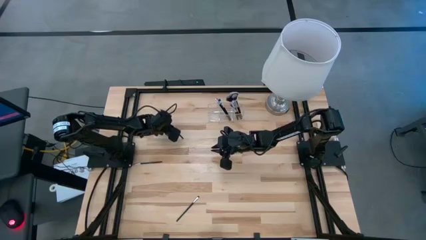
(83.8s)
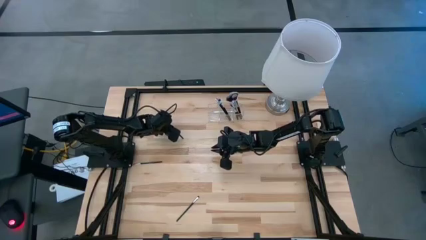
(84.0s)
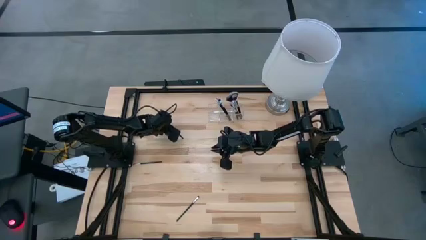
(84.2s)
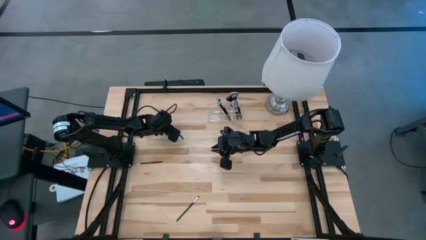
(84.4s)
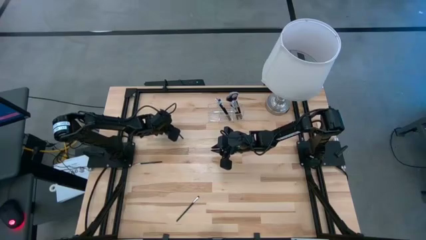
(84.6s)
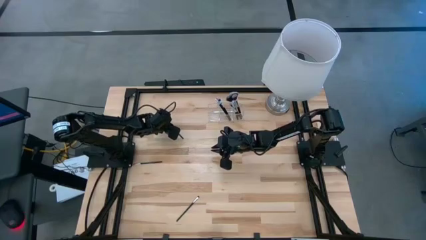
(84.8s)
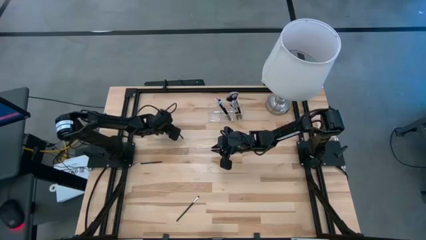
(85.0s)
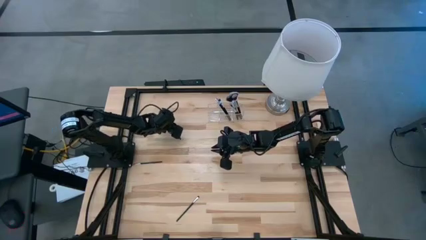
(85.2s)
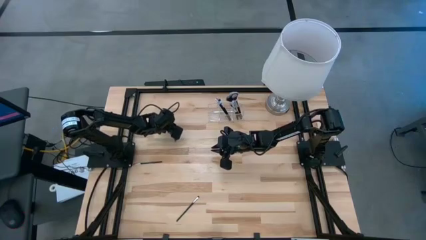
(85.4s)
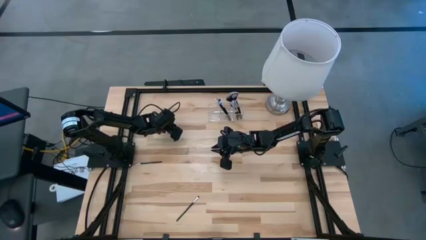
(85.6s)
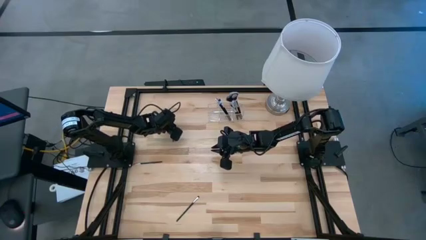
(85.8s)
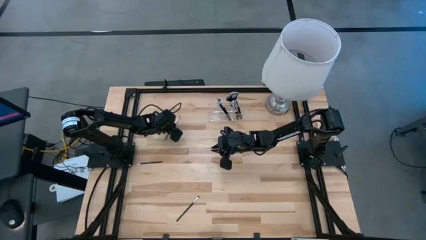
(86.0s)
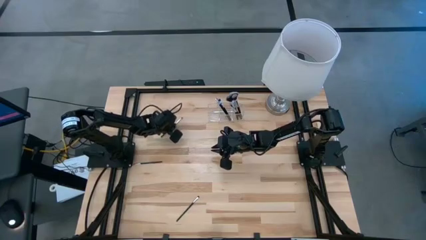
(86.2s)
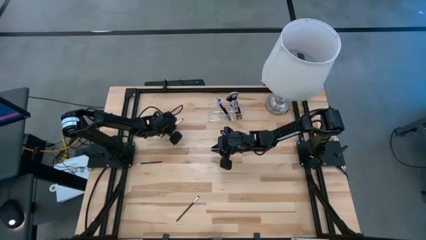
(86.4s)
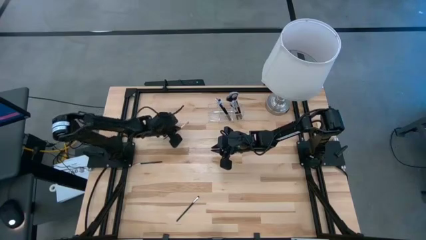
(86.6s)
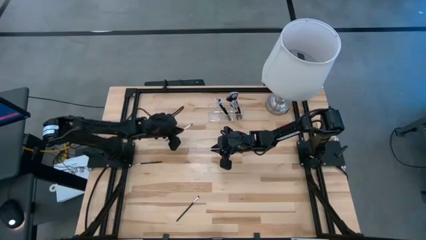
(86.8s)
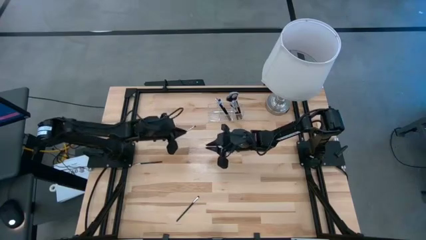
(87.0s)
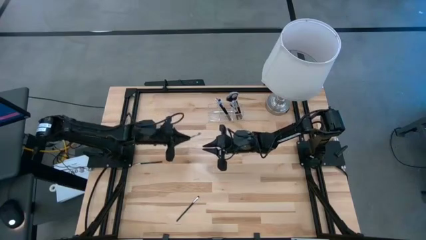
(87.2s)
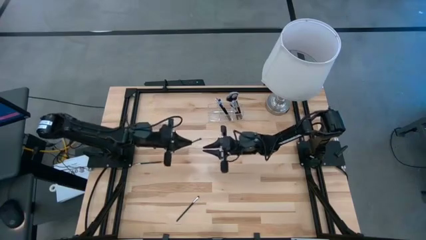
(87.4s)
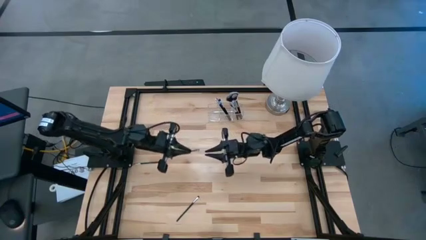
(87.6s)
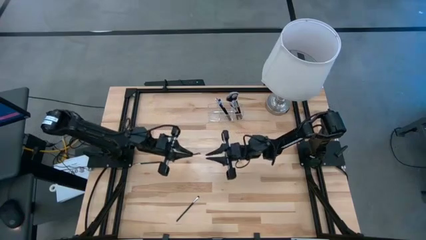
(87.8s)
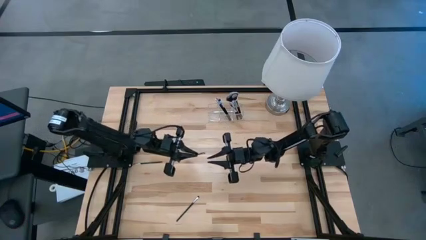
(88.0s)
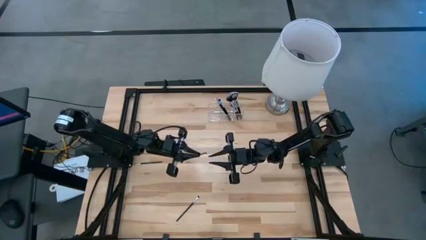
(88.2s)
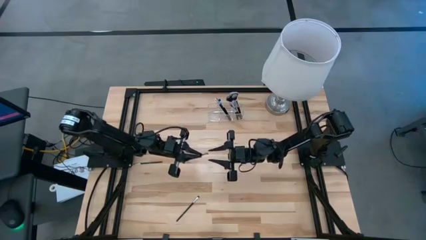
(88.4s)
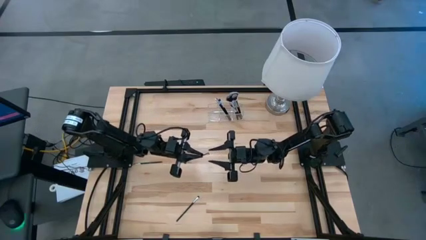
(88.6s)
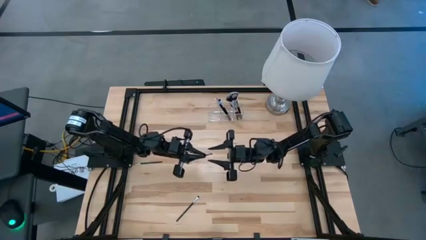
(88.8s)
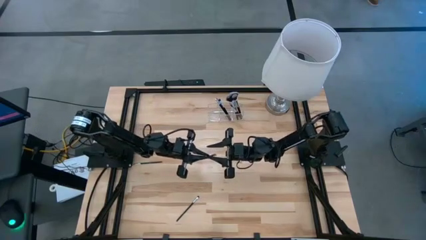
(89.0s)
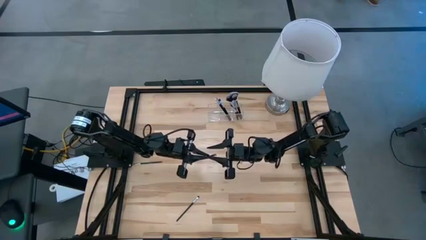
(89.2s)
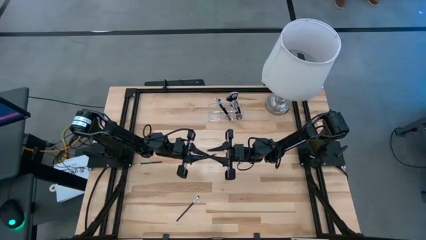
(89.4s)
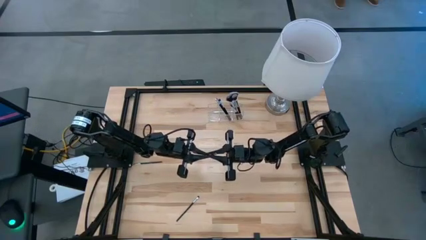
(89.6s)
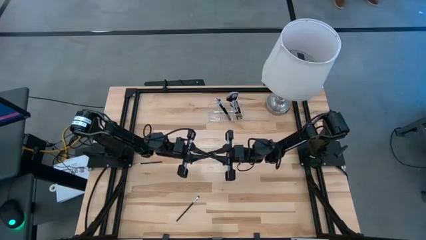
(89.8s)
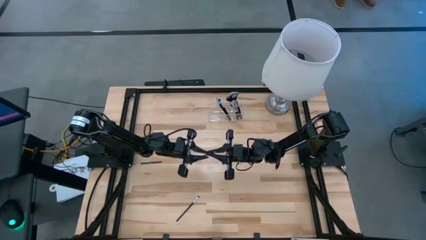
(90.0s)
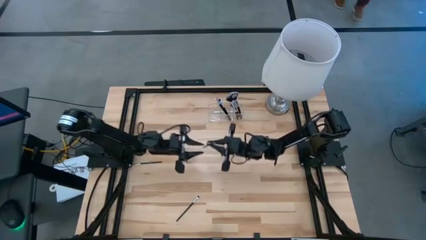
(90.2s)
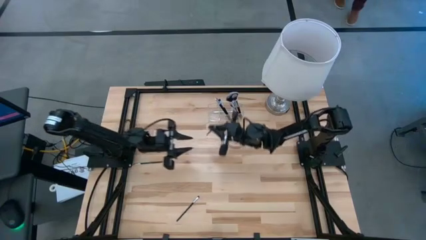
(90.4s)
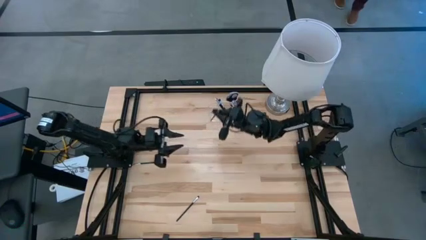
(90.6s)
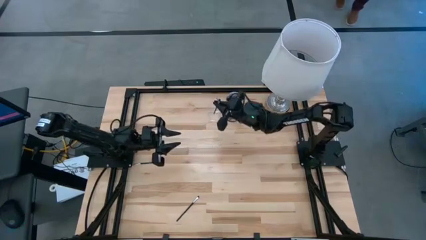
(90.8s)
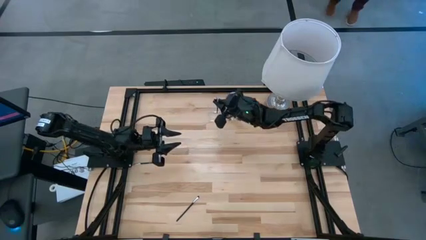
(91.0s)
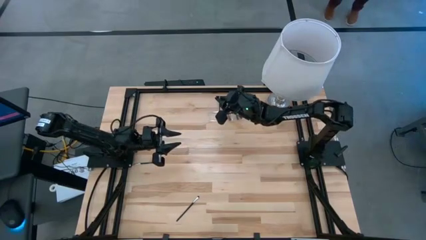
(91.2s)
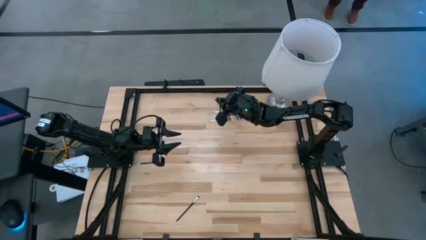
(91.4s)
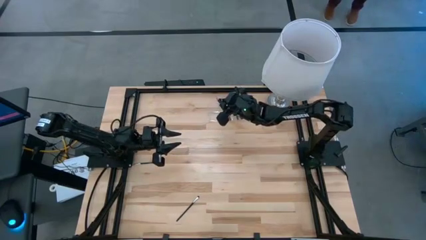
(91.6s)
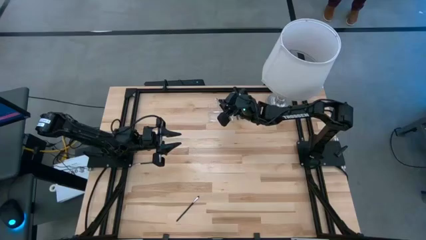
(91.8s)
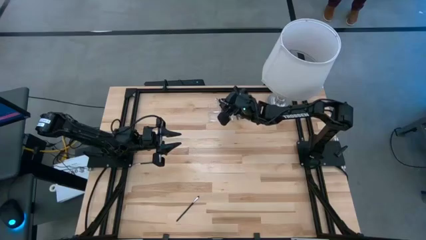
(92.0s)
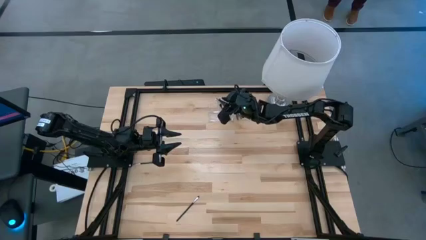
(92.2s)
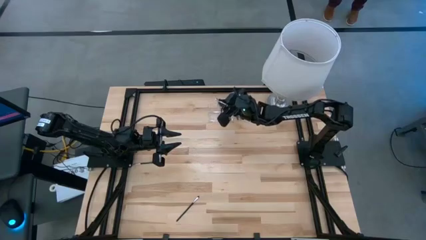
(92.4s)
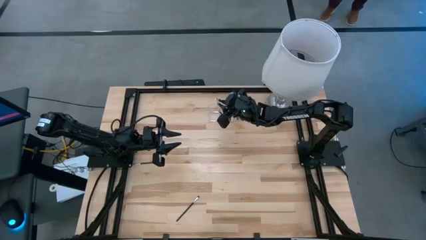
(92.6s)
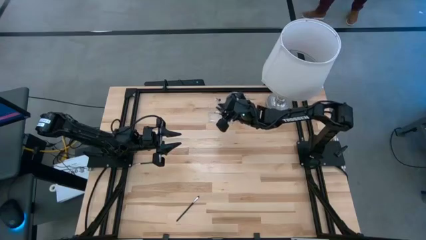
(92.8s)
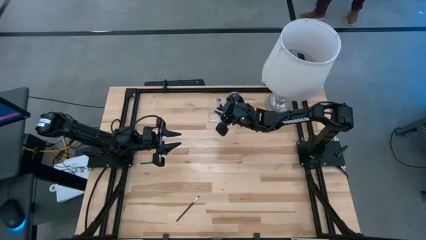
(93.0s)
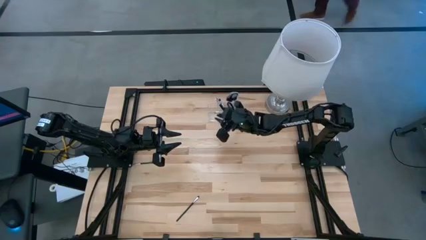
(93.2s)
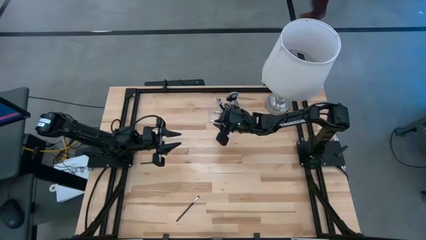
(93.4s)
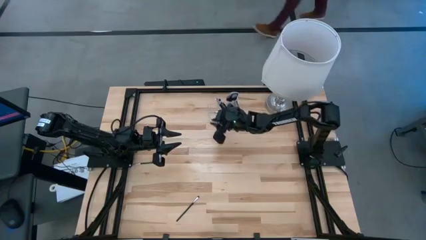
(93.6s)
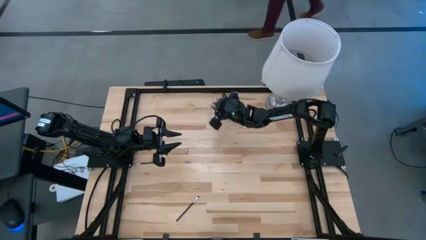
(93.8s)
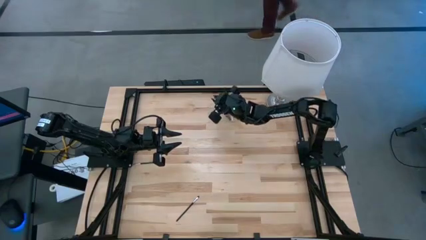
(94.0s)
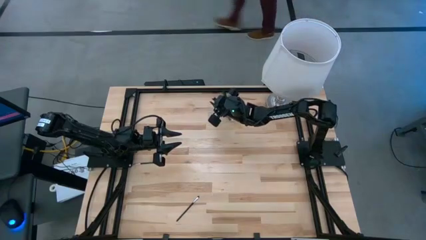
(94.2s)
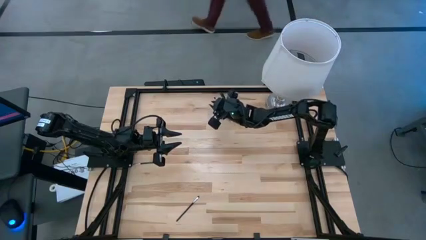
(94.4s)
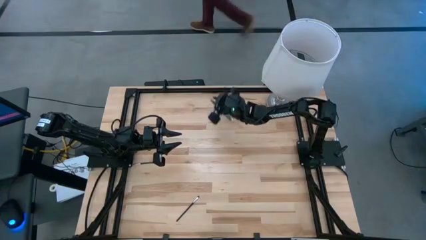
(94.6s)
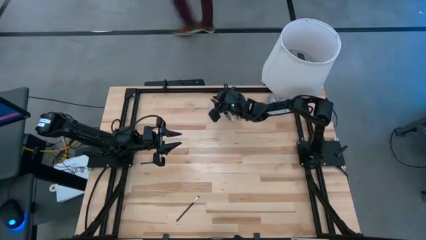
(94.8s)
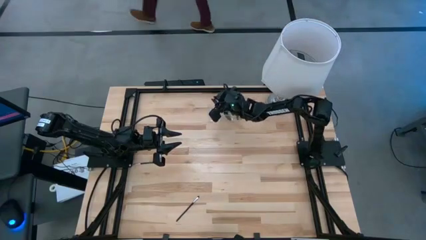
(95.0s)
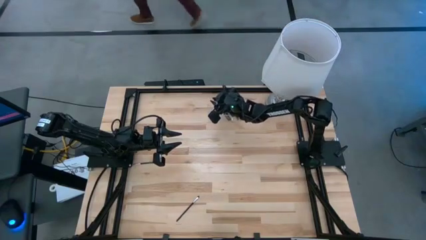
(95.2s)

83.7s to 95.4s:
Task: Put items in baskets/containers
Put the silver eyeshadow brush into the transparent organizer

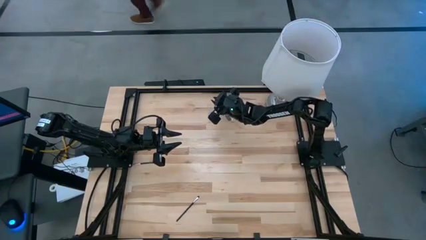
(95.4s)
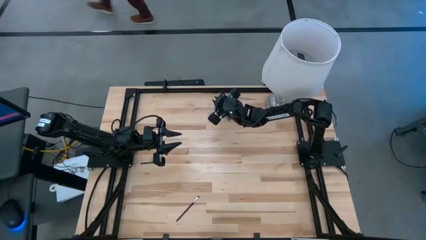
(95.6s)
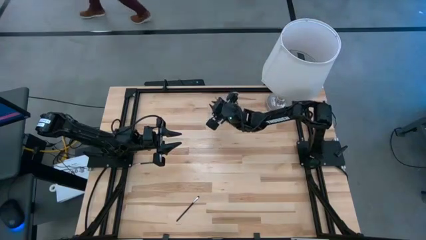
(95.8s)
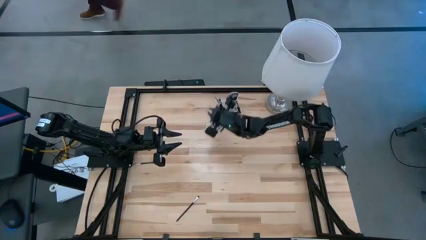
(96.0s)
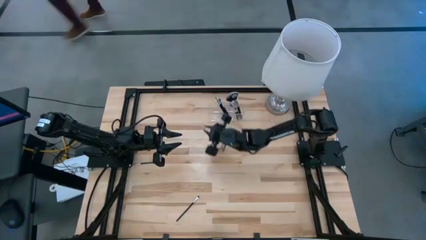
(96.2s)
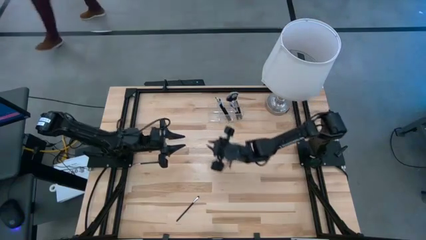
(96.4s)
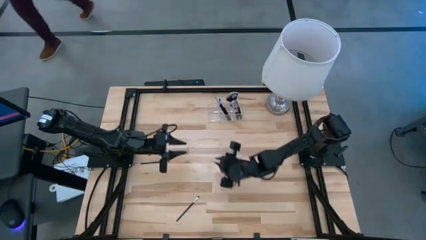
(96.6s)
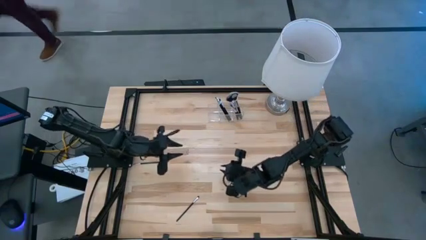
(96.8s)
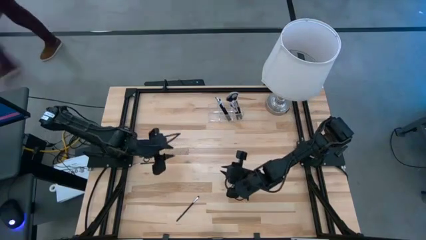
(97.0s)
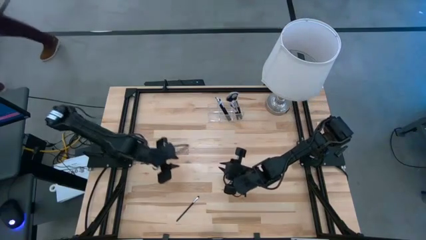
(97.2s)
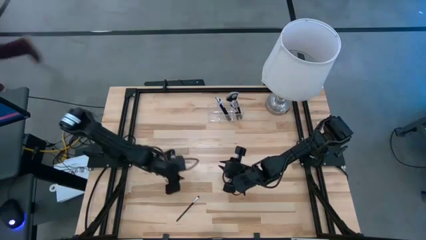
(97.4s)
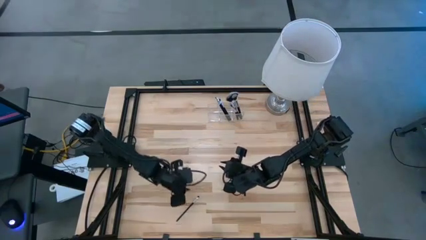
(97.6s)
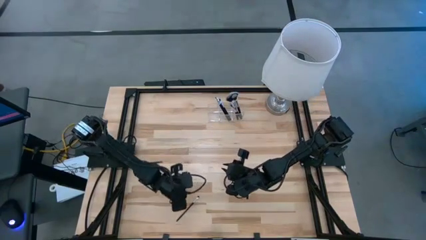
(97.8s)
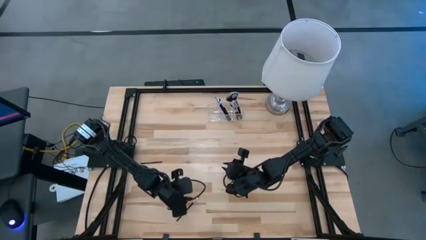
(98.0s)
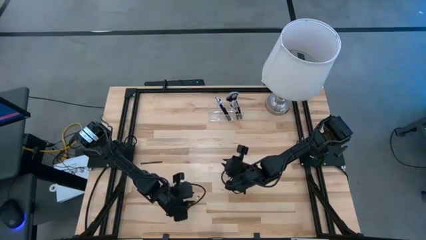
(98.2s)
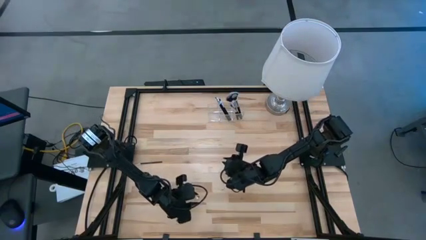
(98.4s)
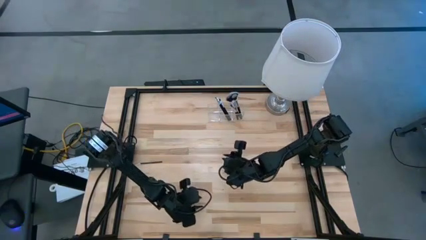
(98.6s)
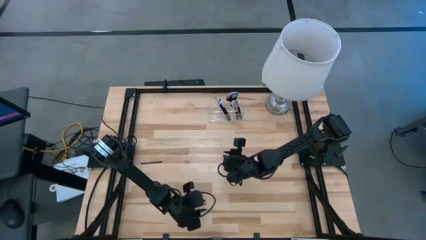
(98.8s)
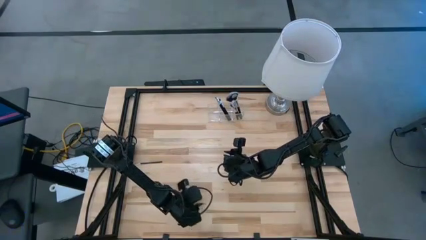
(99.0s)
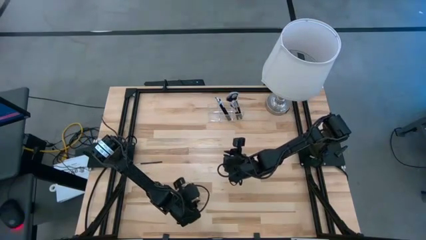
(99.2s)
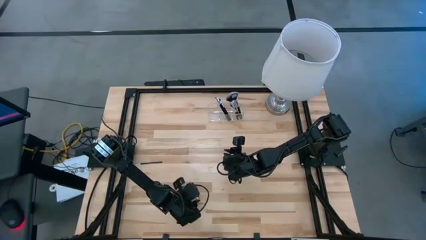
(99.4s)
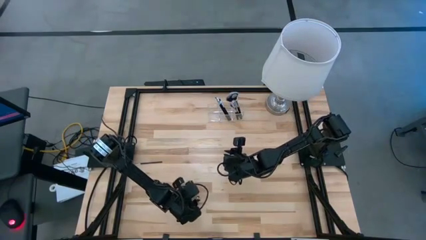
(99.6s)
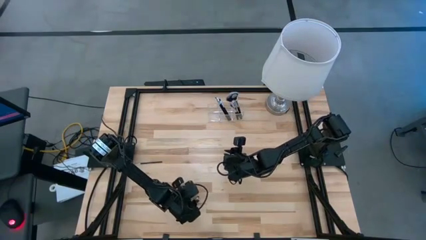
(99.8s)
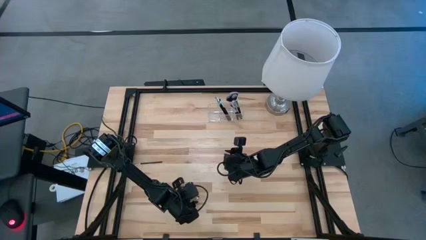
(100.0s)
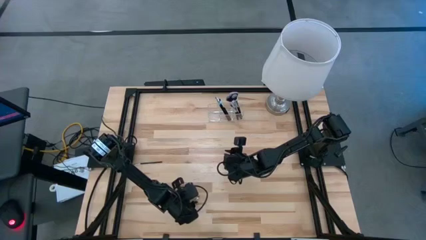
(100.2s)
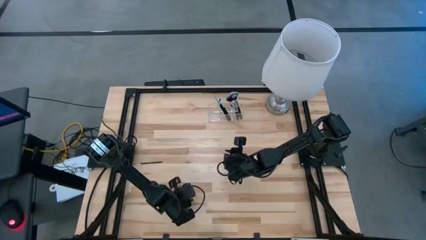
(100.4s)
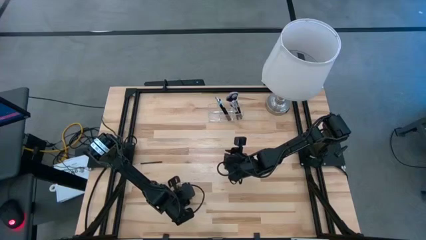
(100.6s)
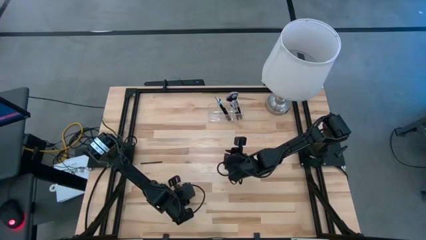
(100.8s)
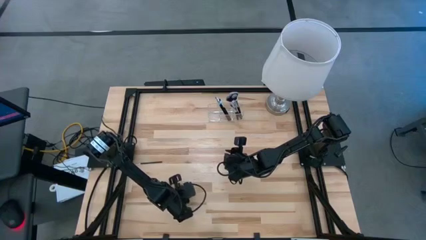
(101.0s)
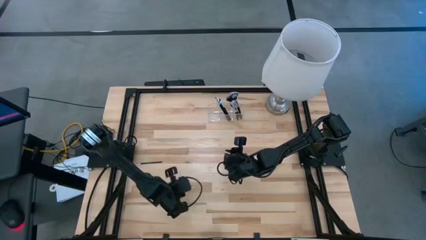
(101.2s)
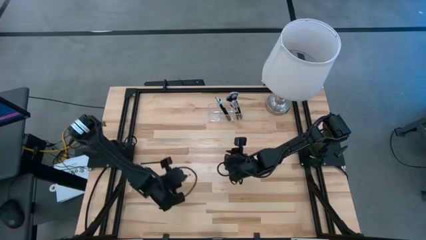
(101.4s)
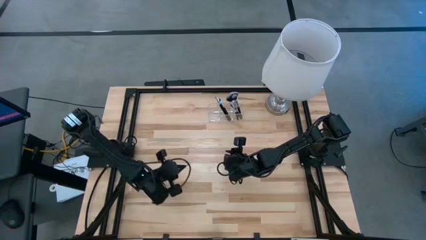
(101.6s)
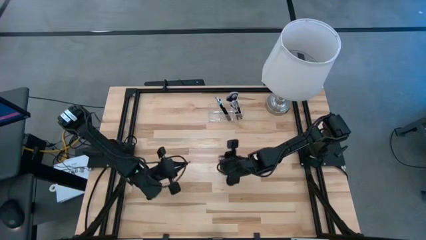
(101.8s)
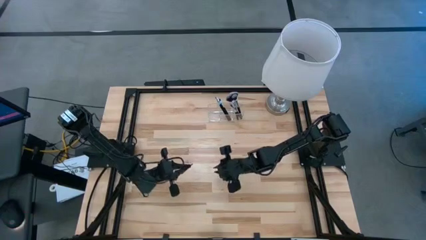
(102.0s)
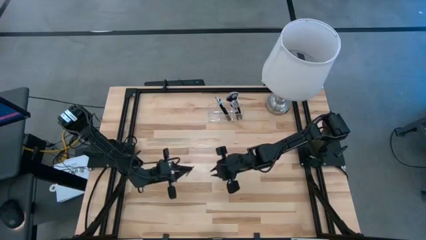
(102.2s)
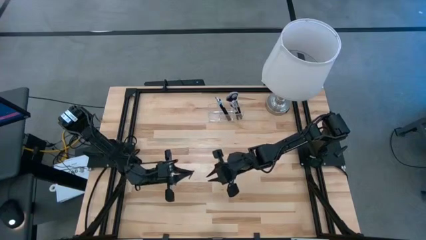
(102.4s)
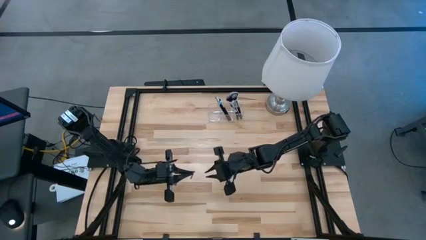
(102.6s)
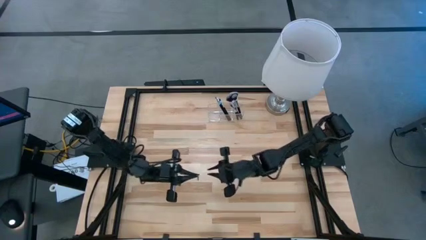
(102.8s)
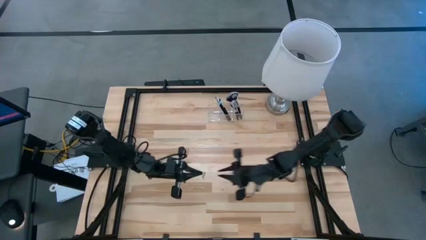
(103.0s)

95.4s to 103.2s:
Put the silver eyeshadow brush into the transparent organizer
